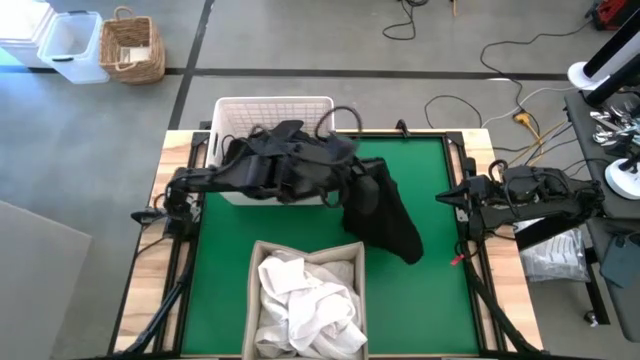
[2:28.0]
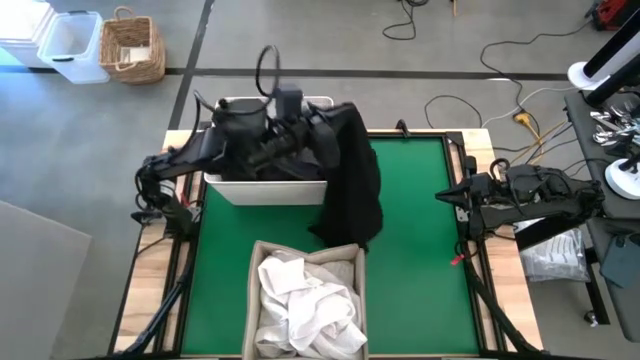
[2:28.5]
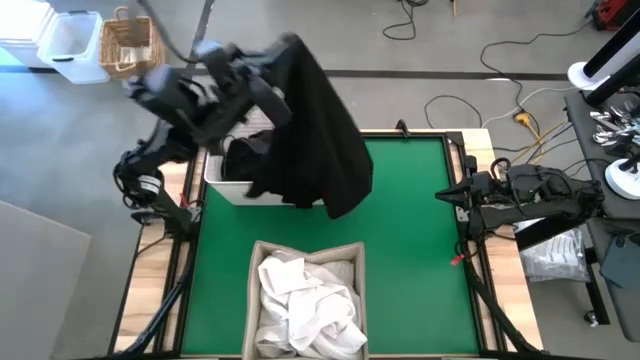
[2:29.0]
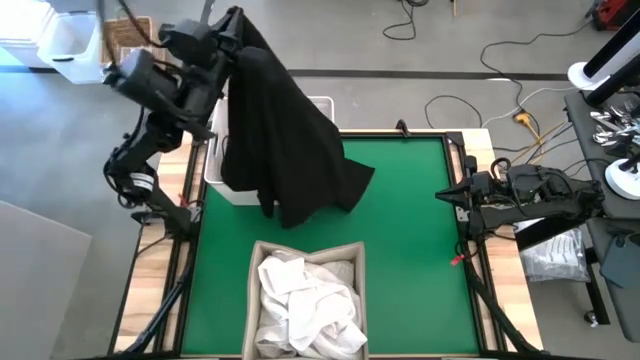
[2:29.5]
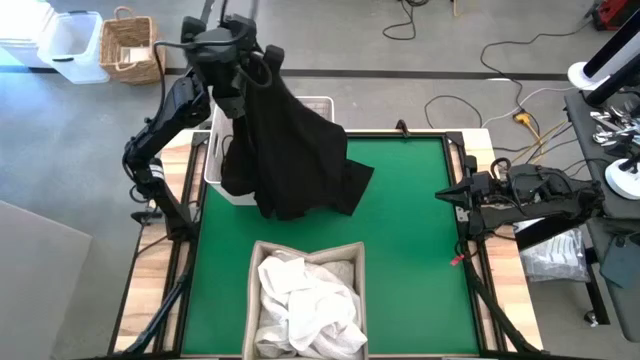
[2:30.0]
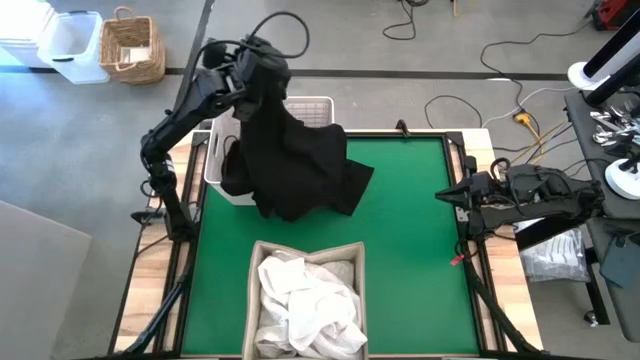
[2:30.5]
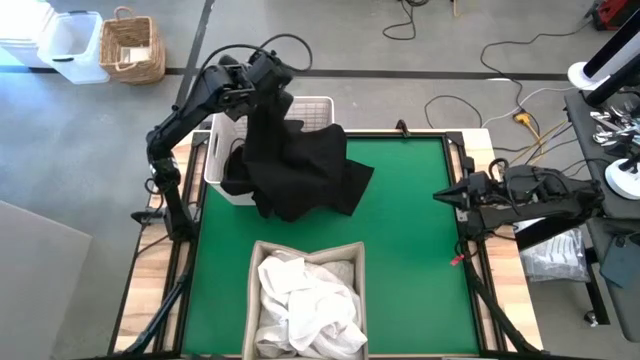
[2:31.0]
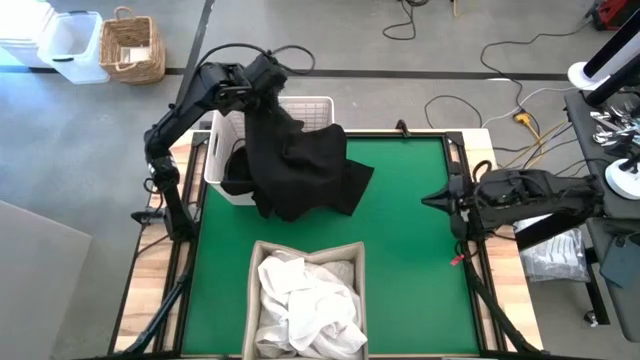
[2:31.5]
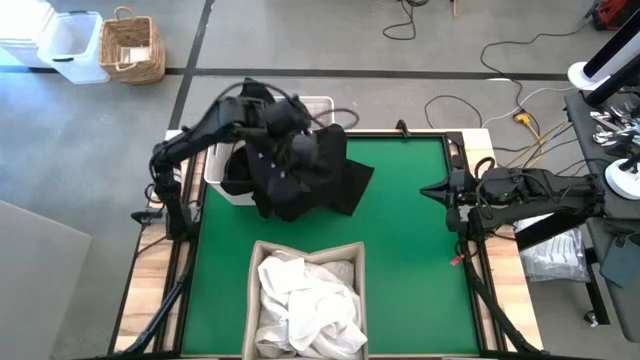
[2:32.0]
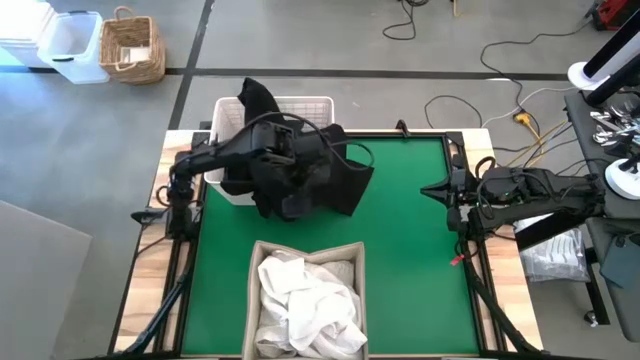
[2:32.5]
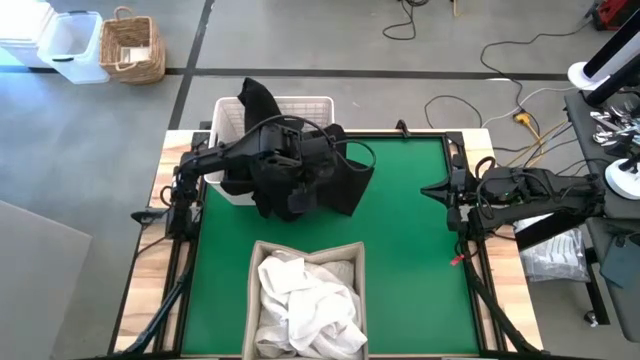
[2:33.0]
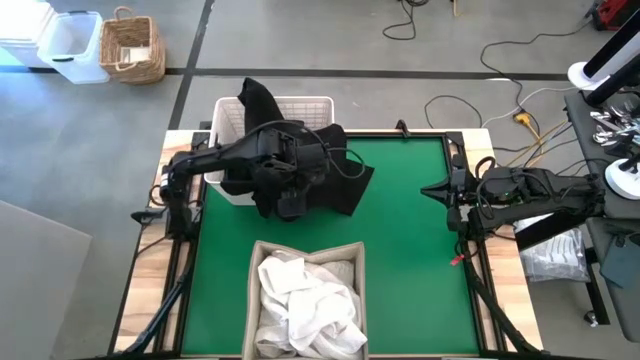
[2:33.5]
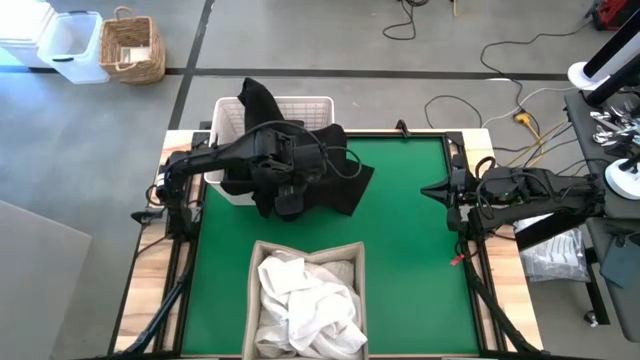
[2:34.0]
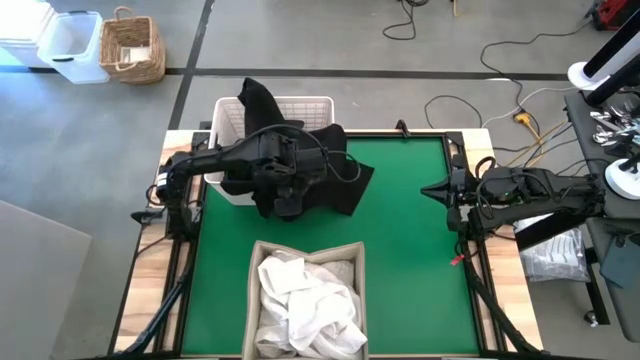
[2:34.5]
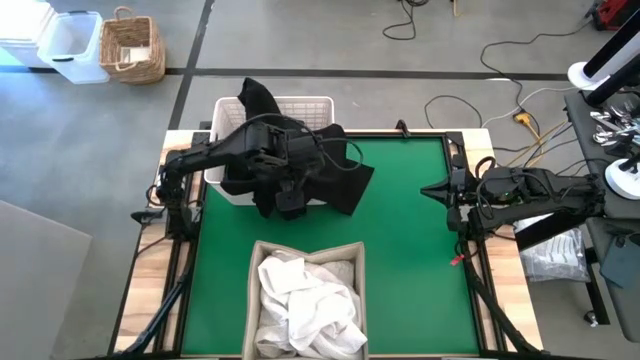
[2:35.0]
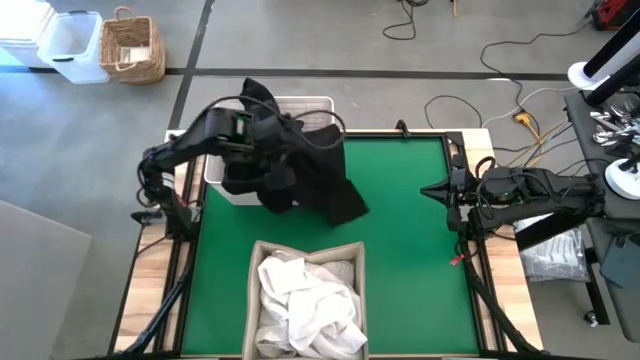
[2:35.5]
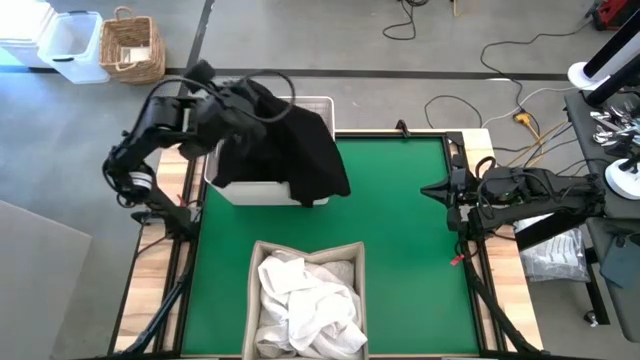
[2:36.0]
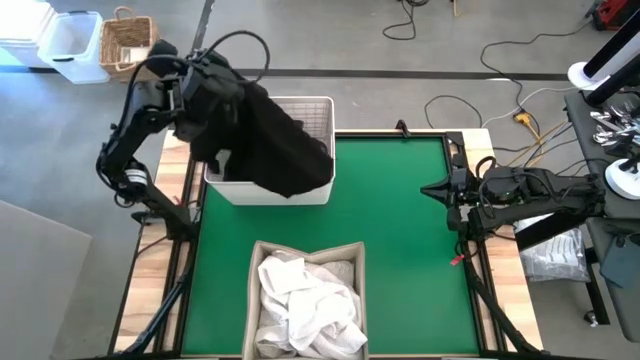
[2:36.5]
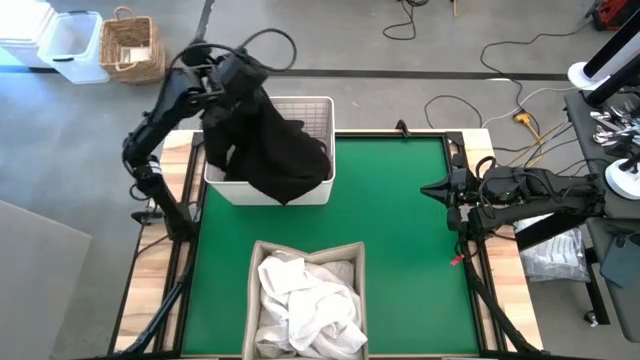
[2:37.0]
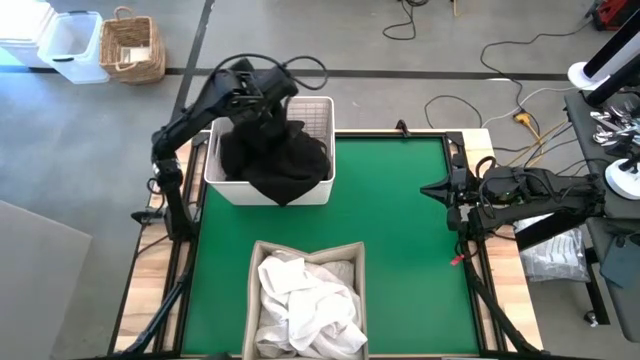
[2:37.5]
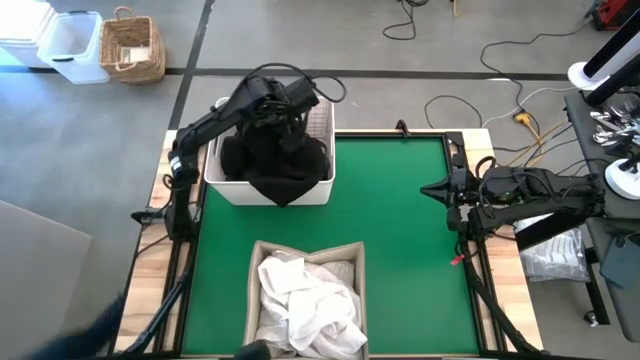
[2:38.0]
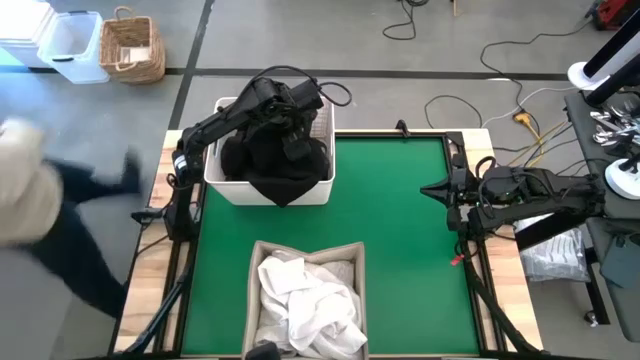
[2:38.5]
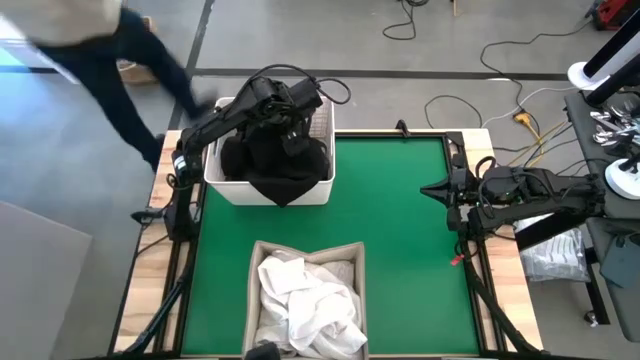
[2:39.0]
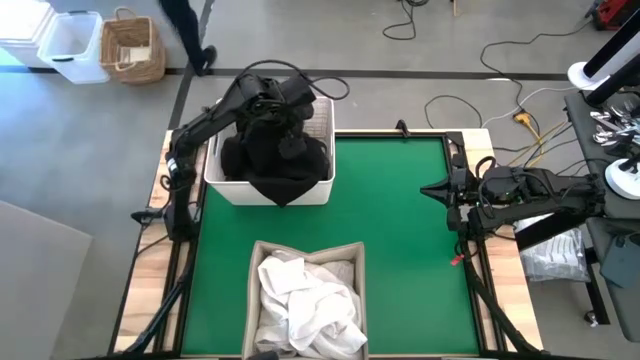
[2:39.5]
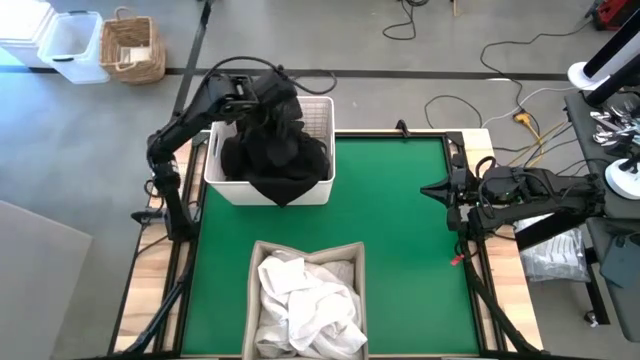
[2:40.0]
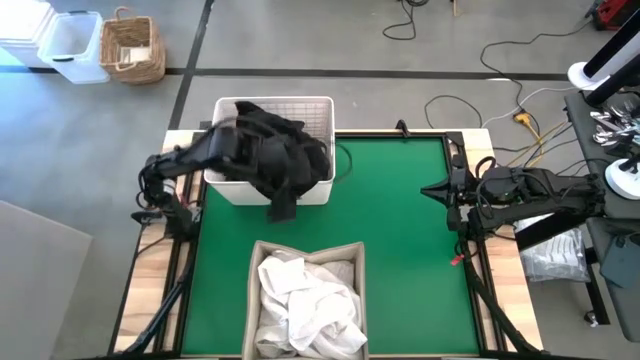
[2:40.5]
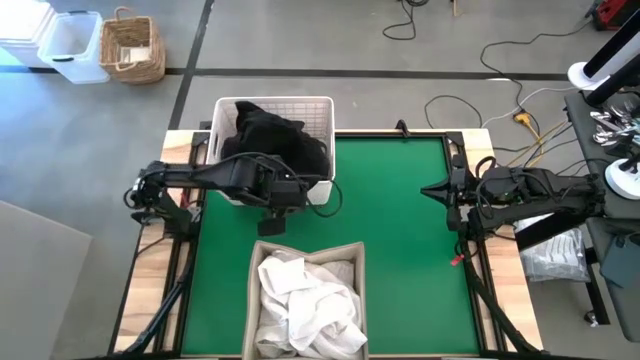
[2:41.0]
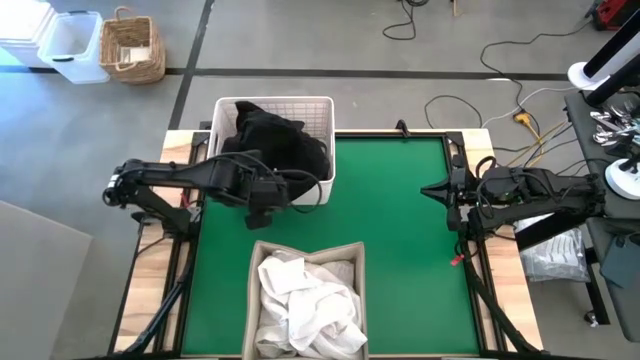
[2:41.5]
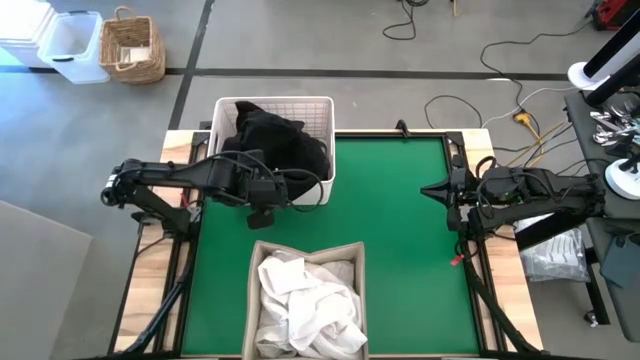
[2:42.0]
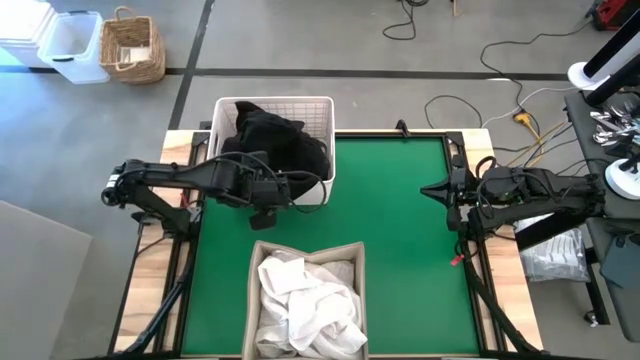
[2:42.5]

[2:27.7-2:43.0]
Put the black shirt into the white bin

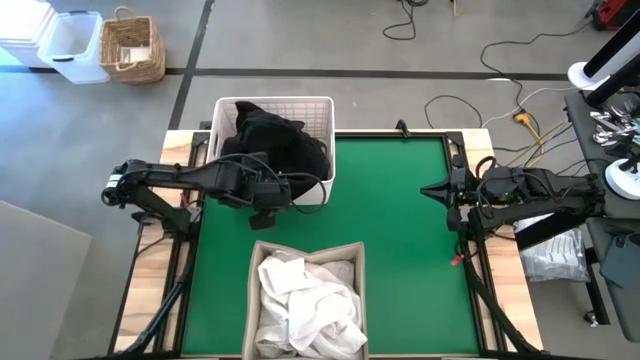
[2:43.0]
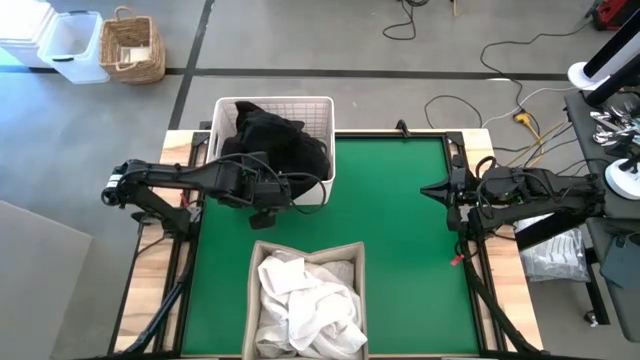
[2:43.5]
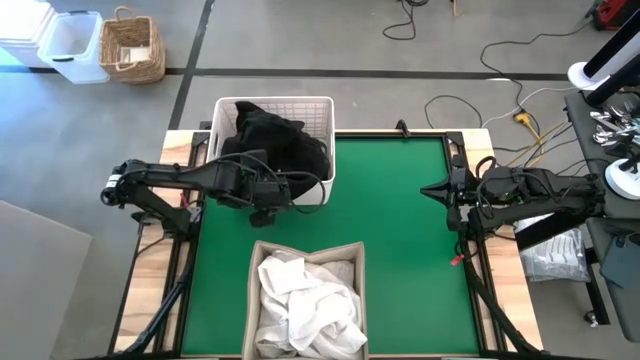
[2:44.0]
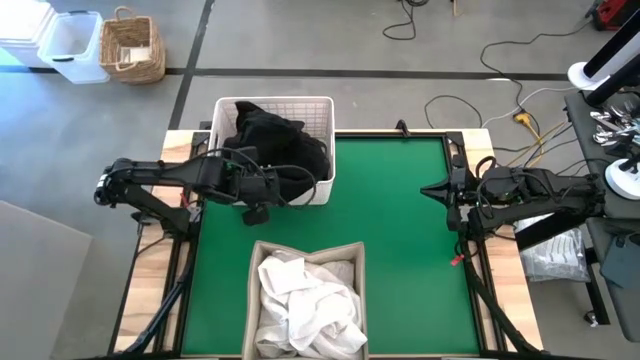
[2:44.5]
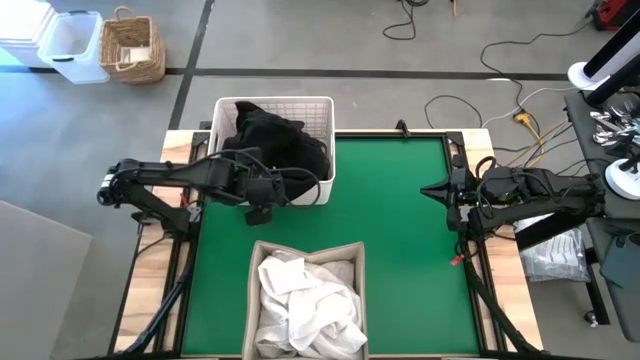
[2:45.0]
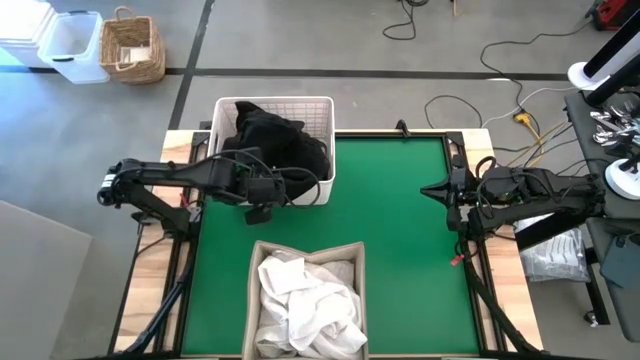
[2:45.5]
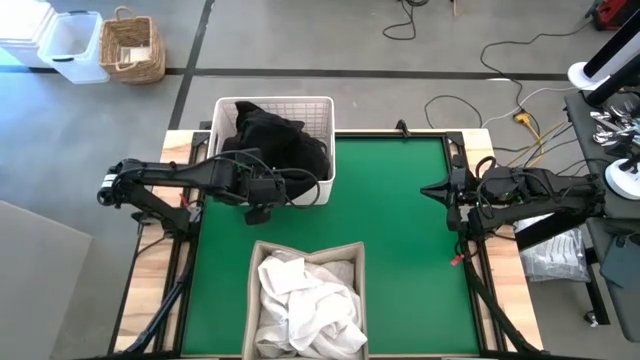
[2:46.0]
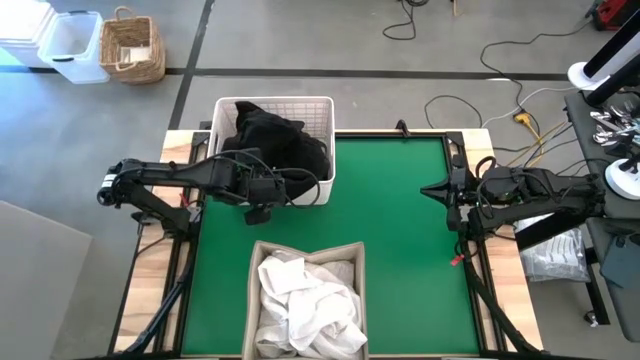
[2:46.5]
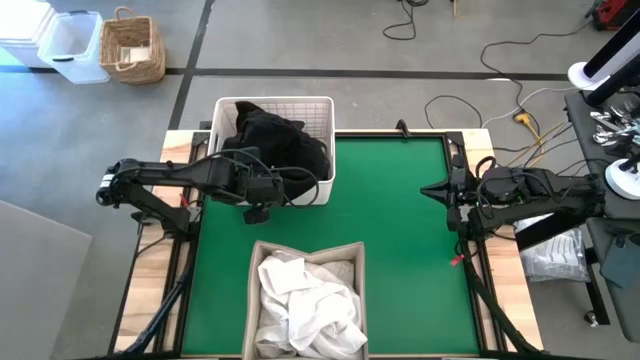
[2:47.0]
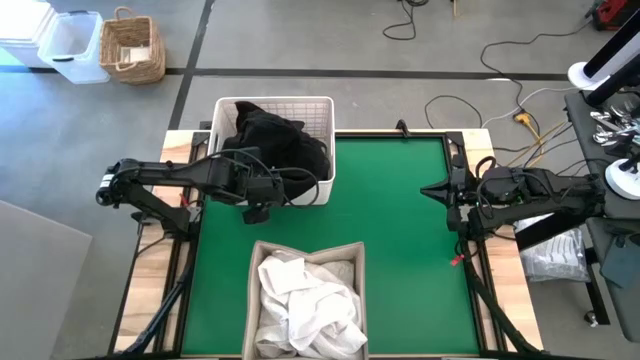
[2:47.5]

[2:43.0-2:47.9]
Put the black shirt into the white bin

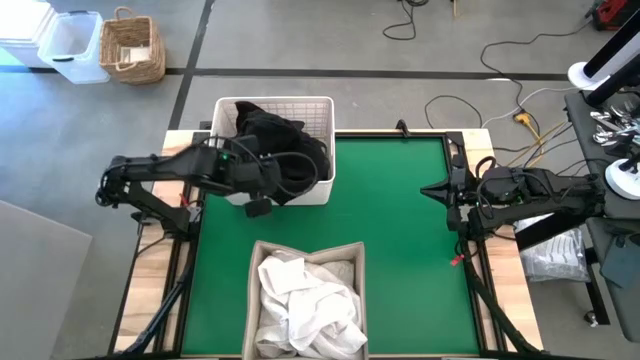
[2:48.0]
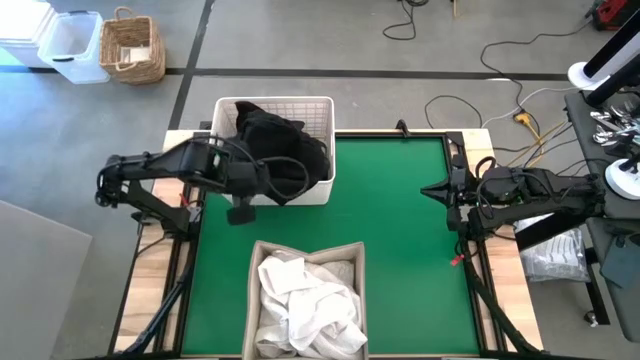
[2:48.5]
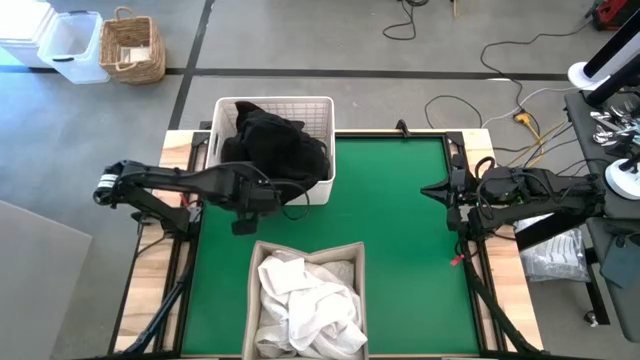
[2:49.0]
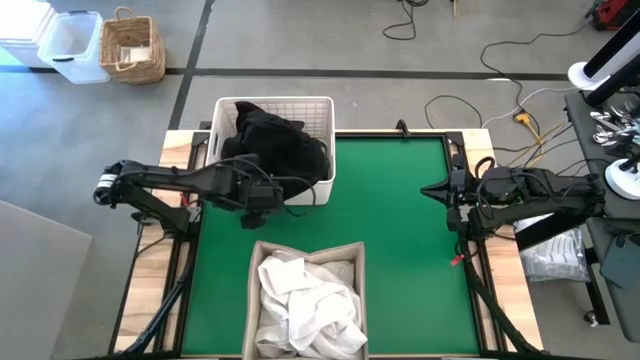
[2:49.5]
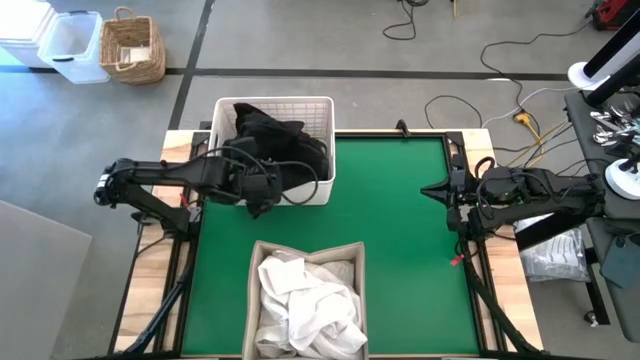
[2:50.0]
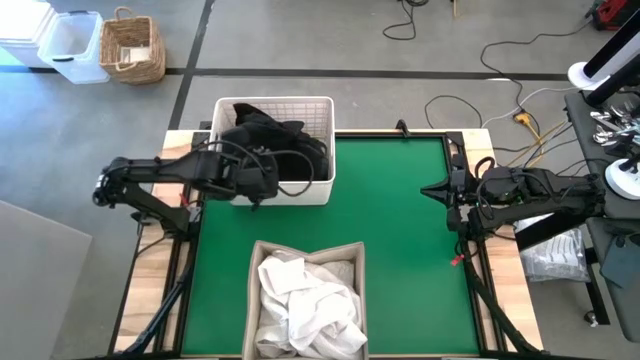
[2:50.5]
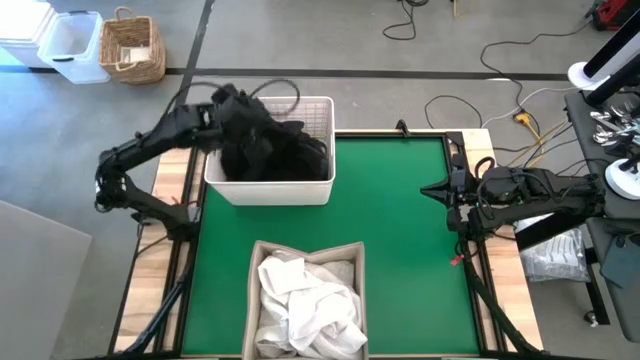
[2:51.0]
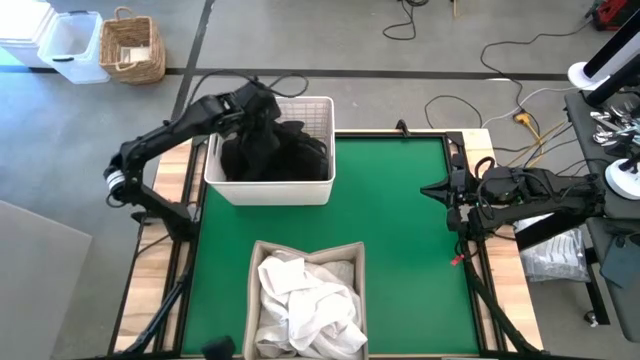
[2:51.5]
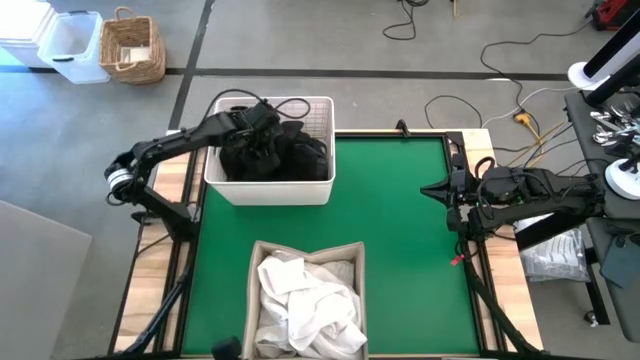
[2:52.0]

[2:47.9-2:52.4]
Put the black shirt into the white bin
